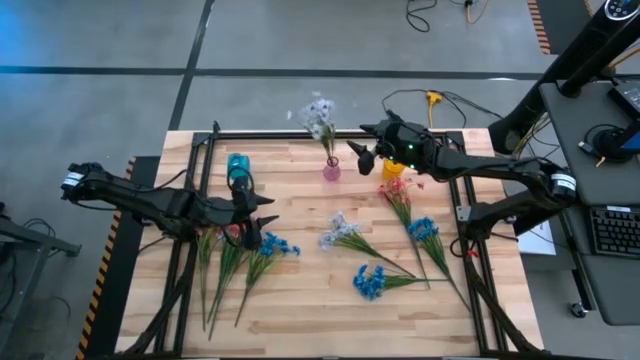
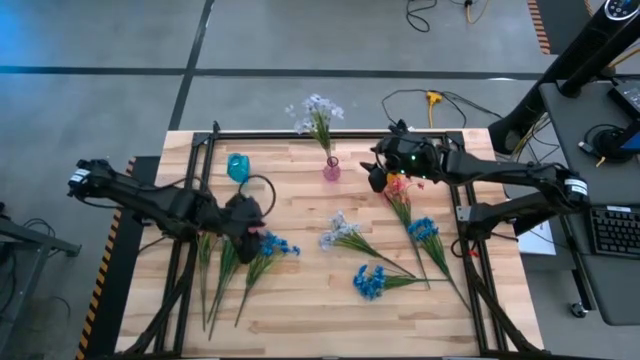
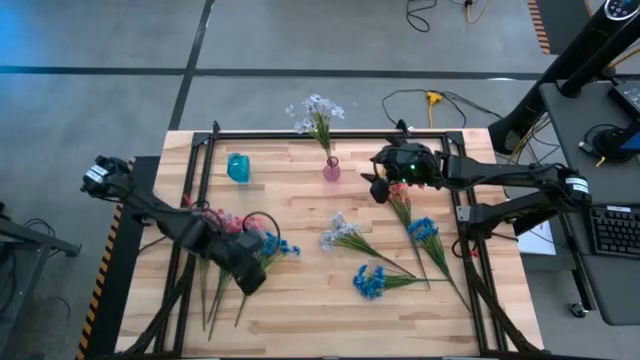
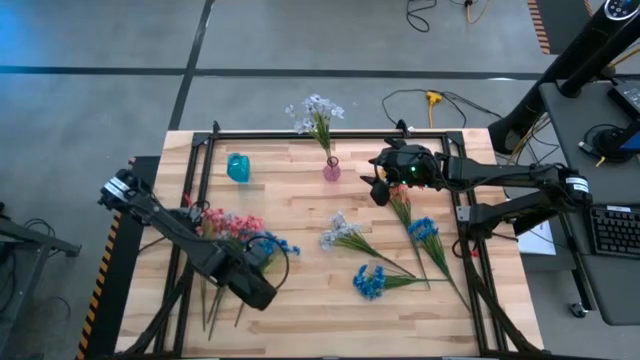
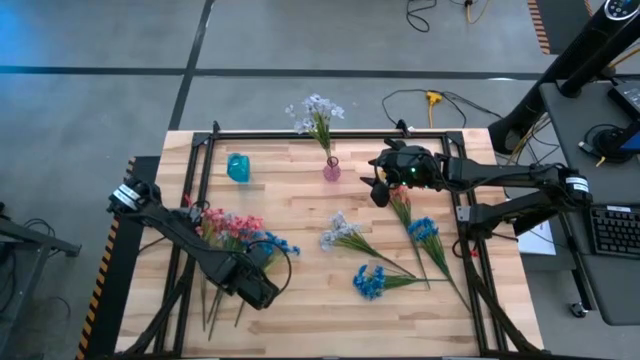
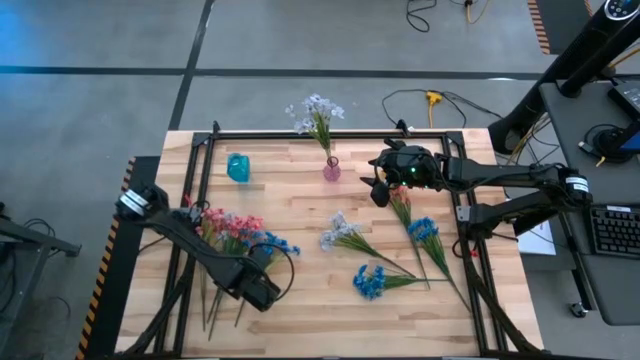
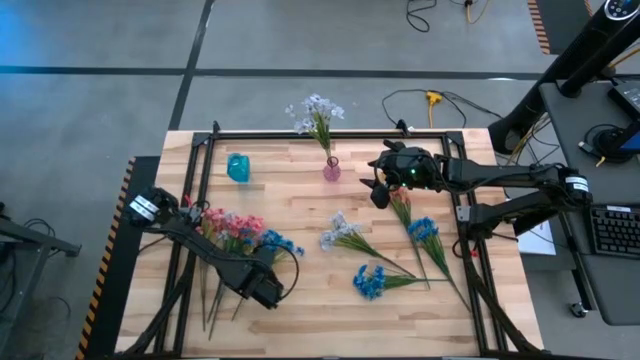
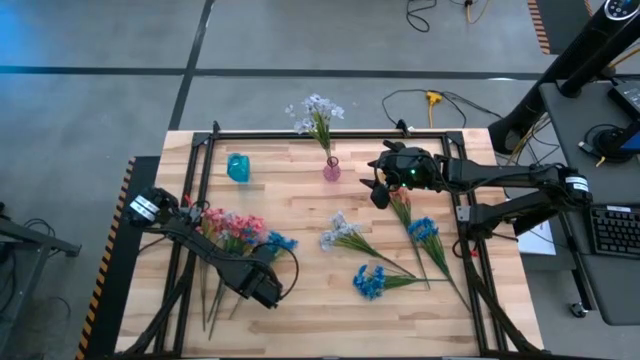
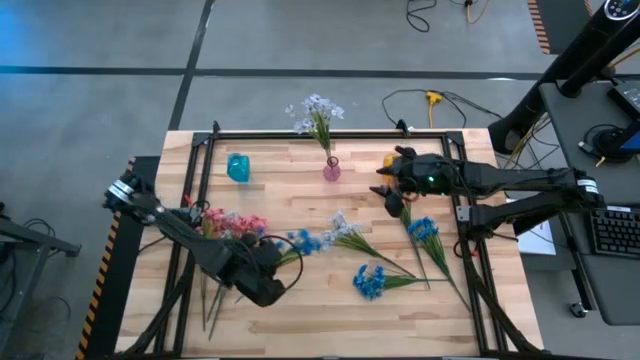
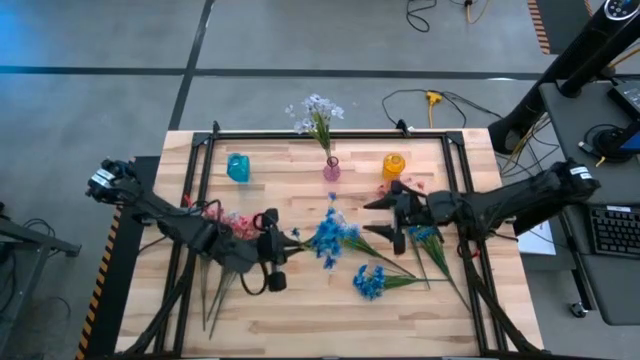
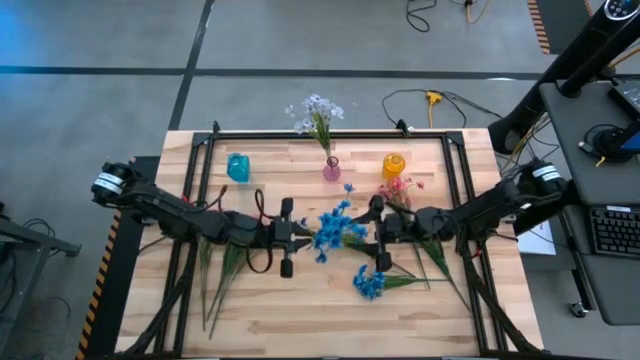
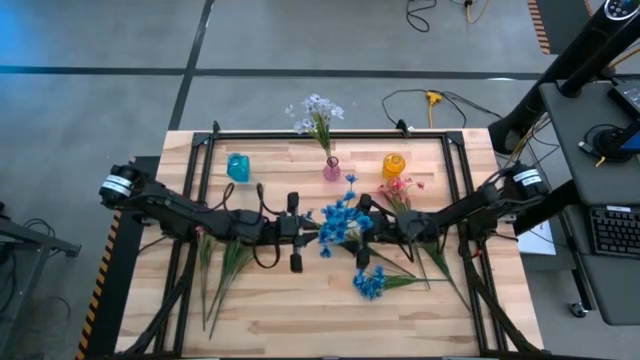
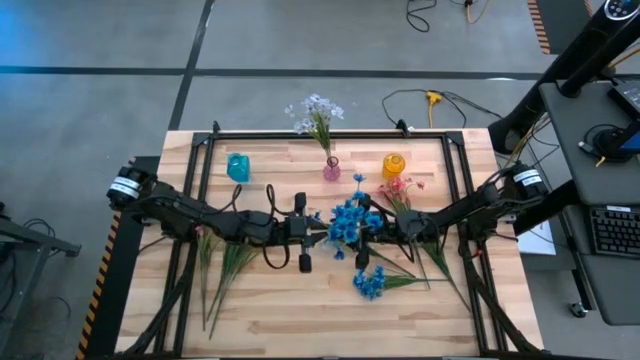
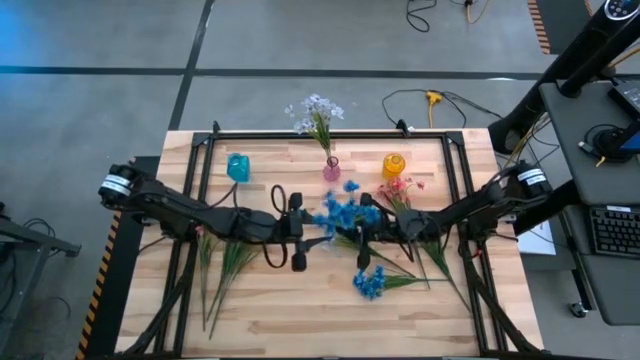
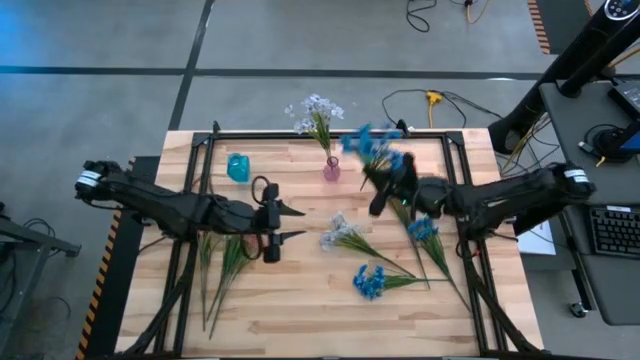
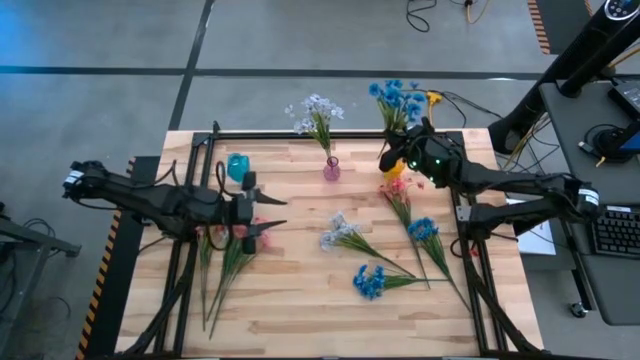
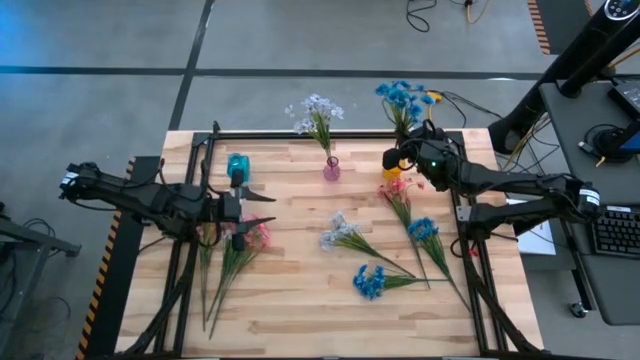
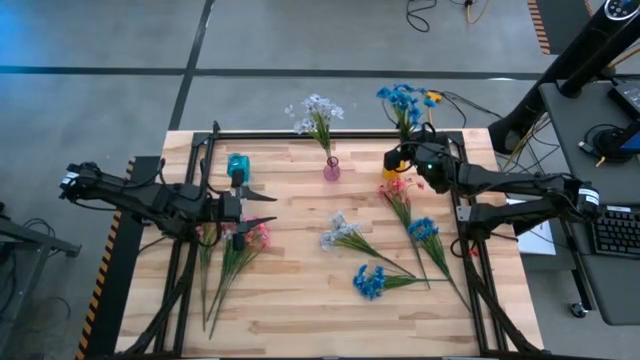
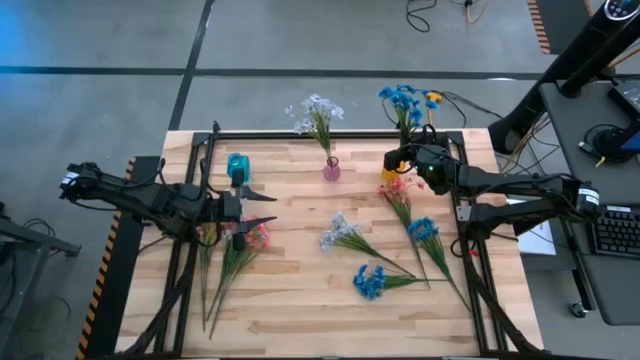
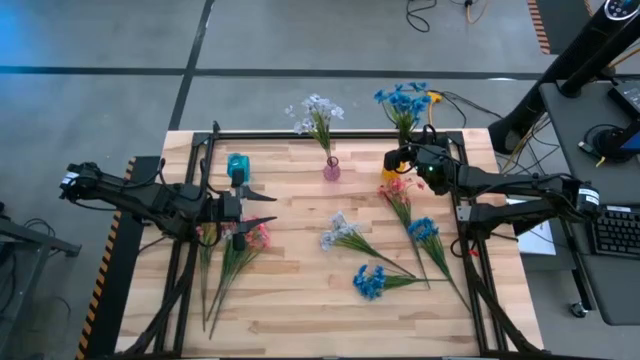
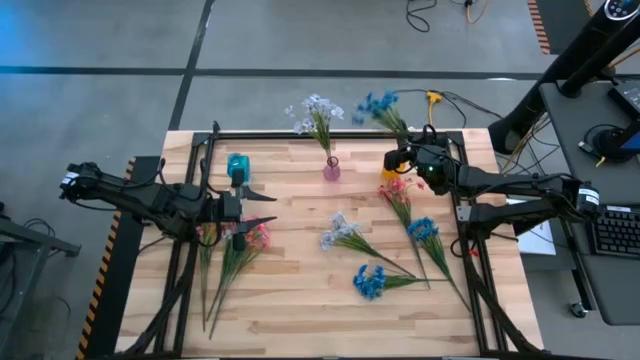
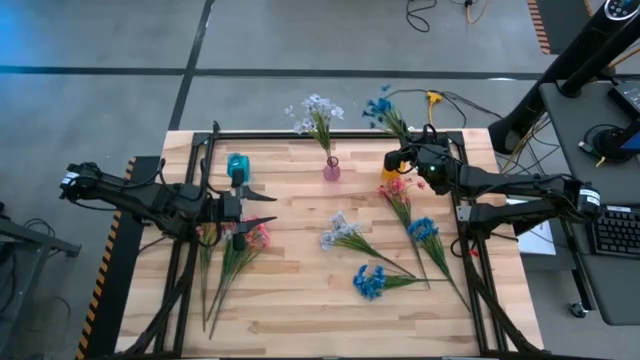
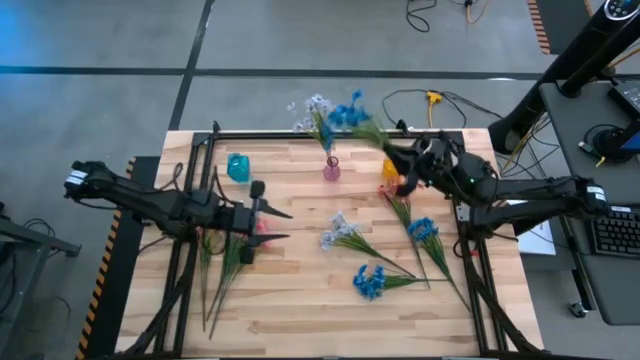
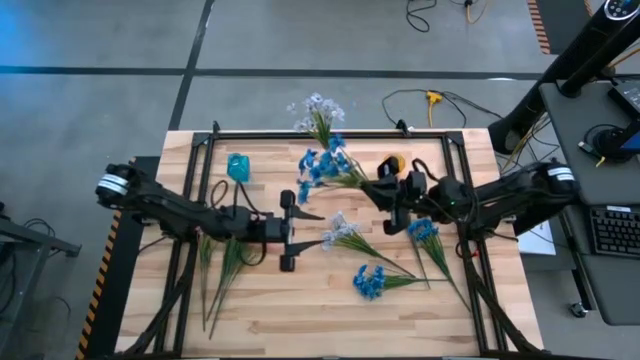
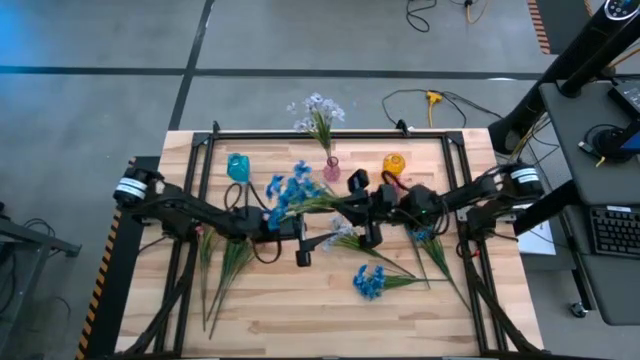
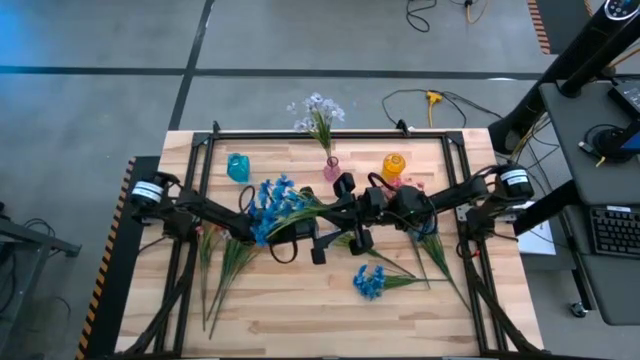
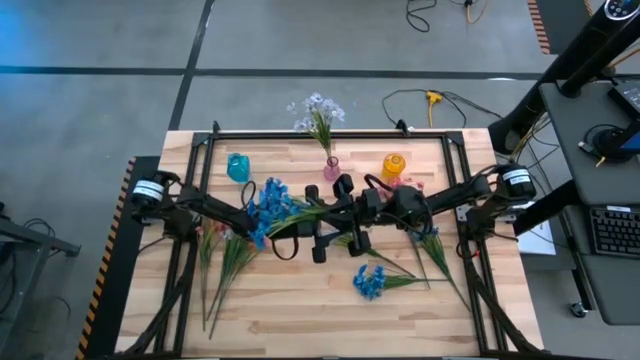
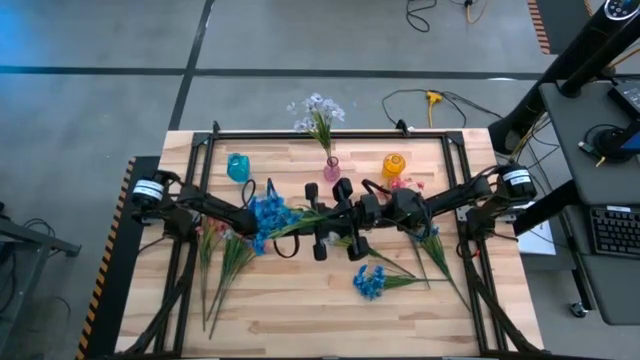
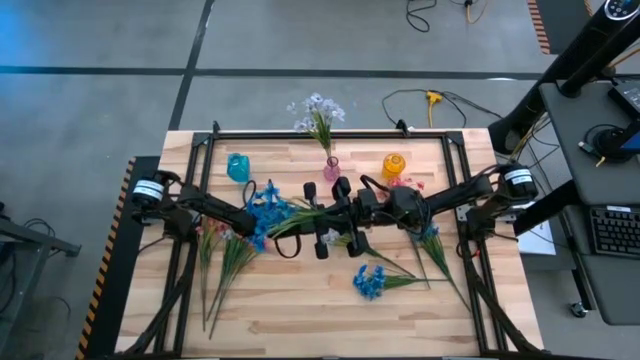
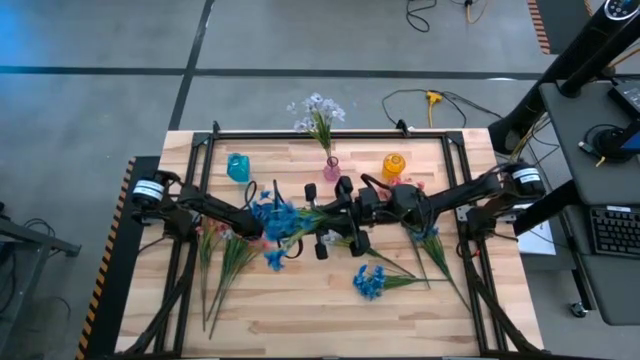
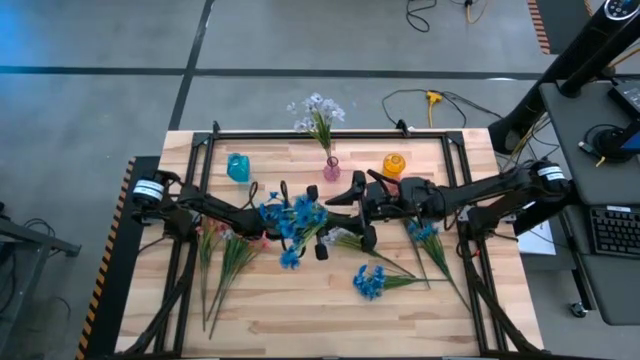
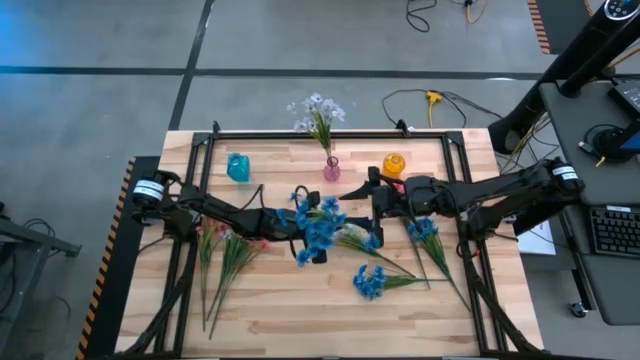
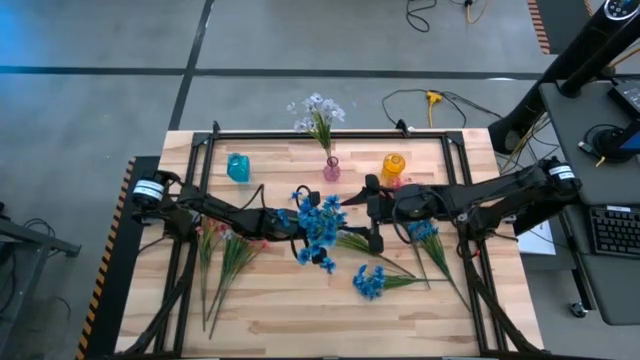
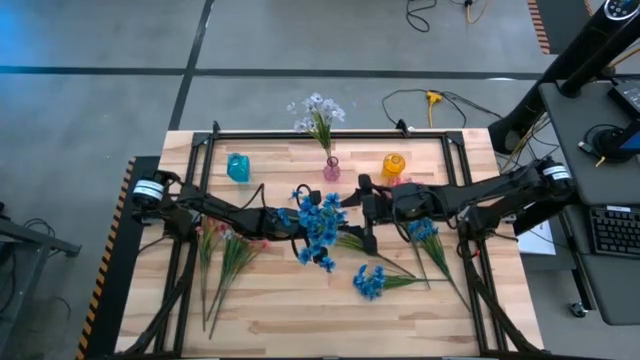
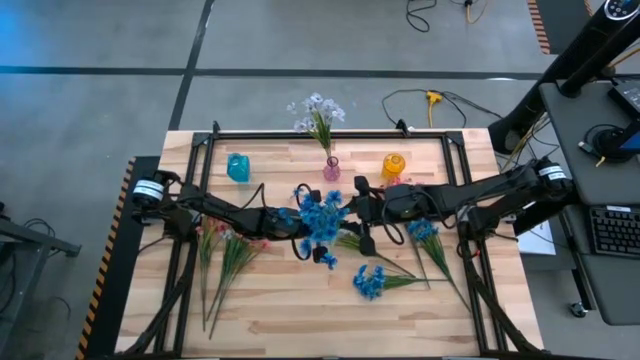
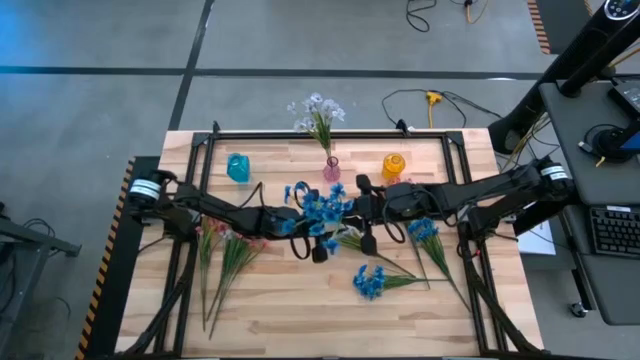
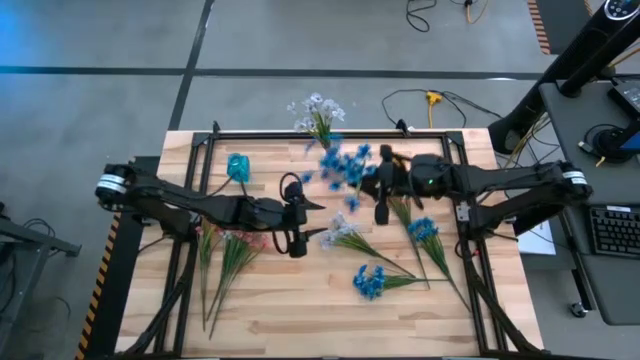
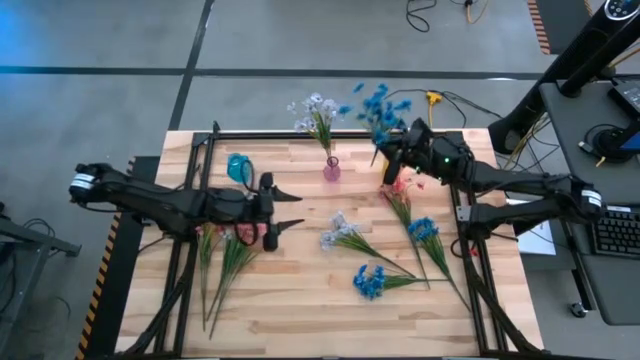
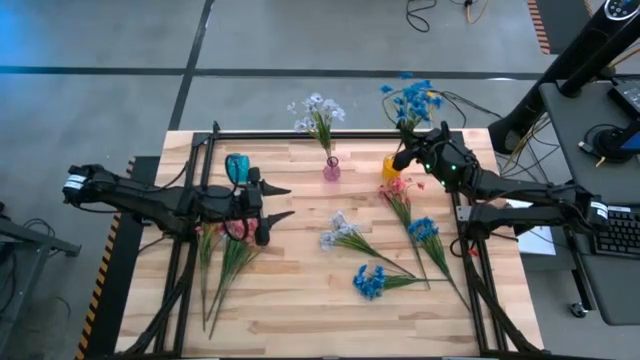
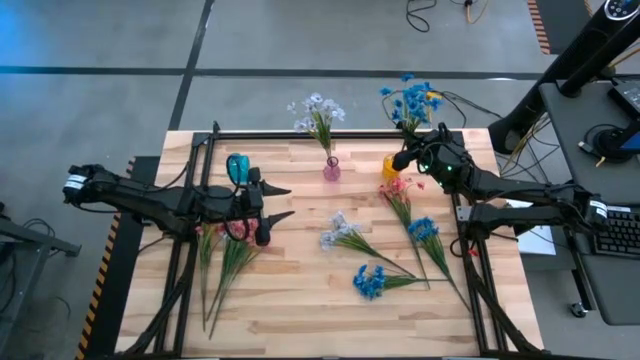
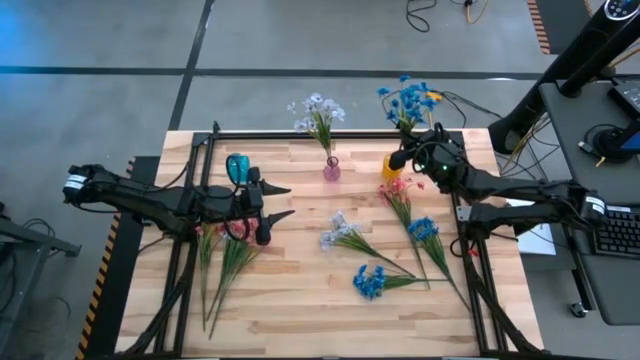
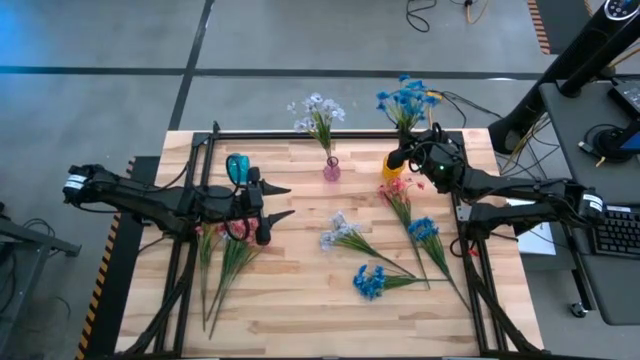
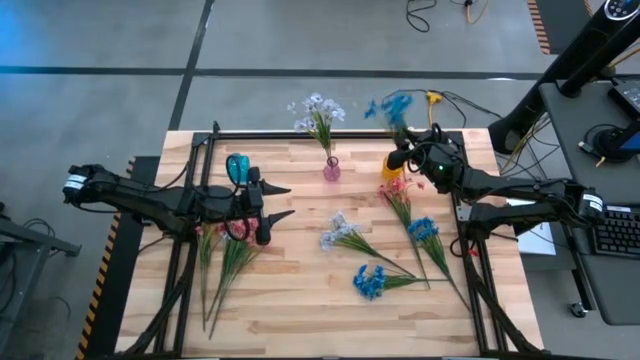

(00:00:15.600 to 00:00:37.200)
Task: Sort flowers into vase by color
Put the left blue flowers into the yellow vase
